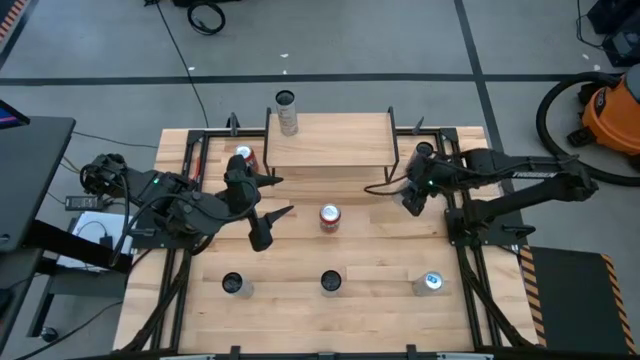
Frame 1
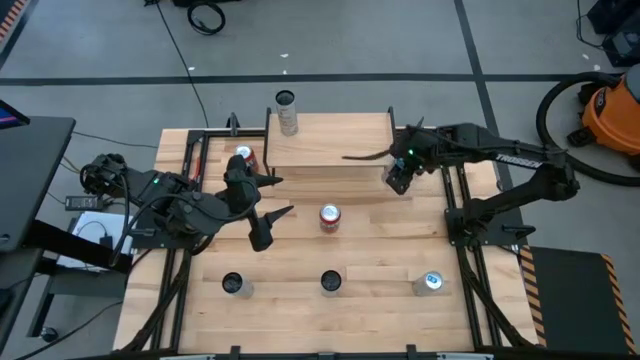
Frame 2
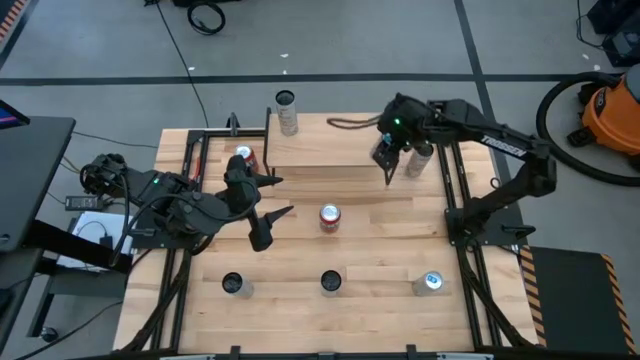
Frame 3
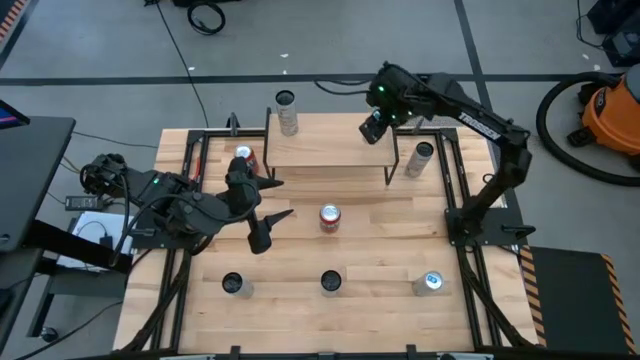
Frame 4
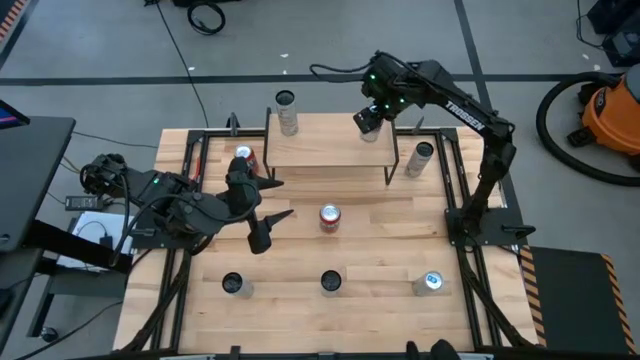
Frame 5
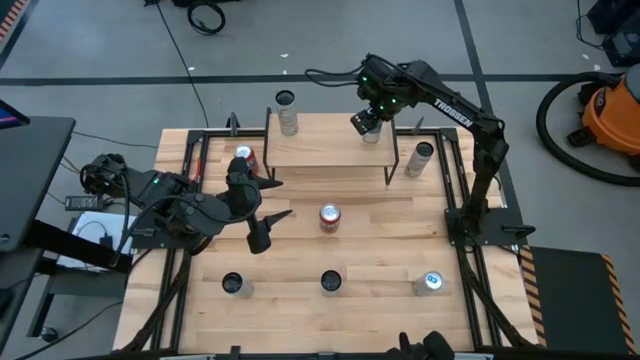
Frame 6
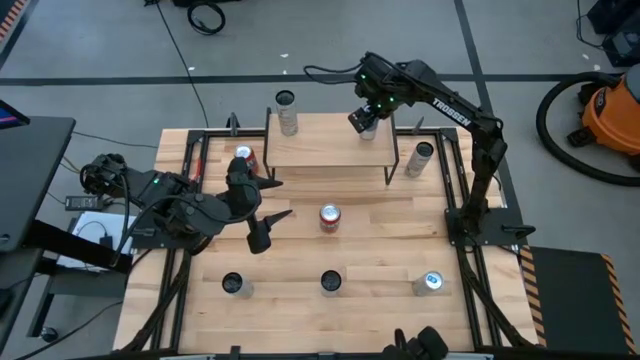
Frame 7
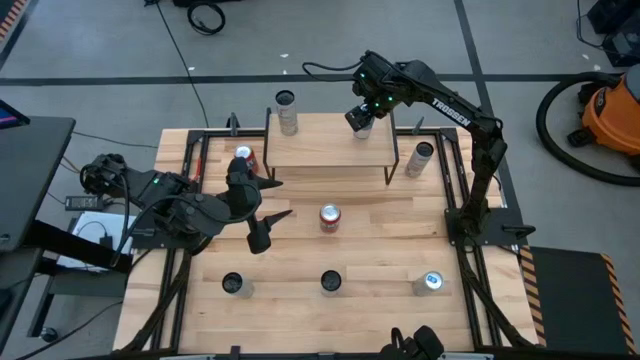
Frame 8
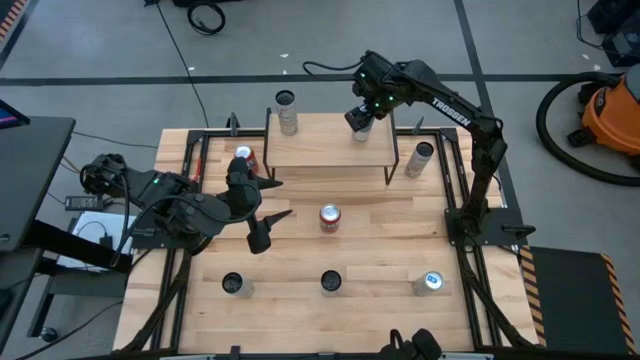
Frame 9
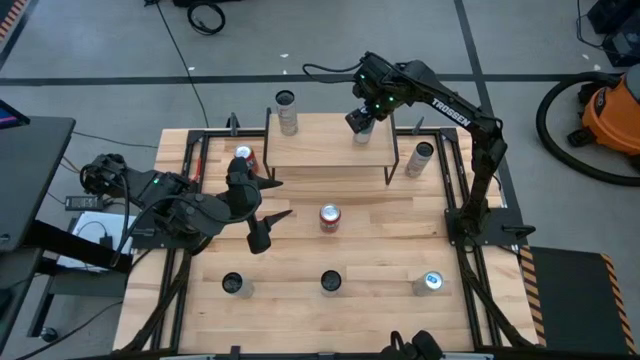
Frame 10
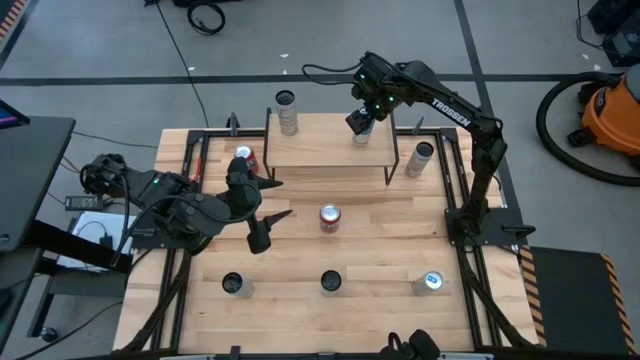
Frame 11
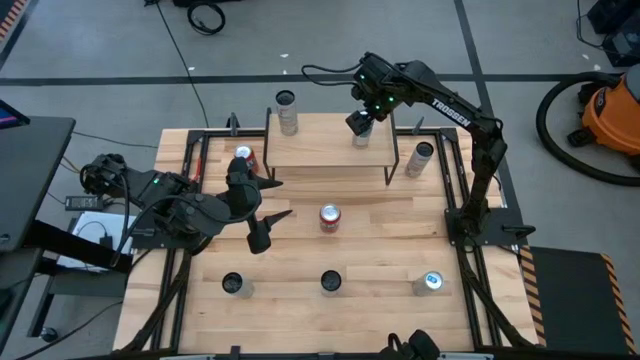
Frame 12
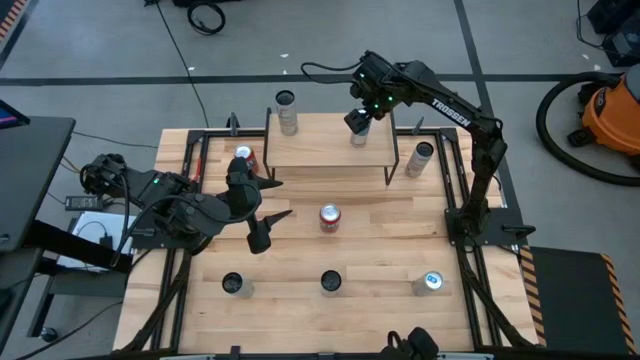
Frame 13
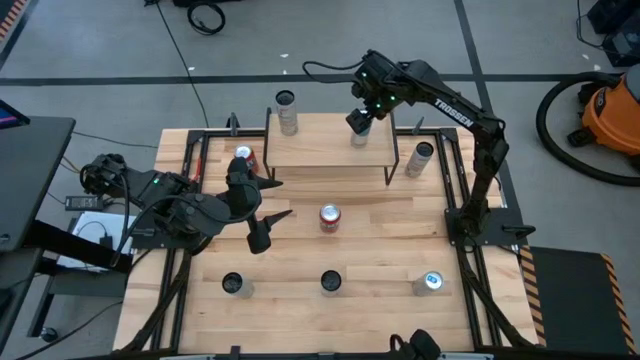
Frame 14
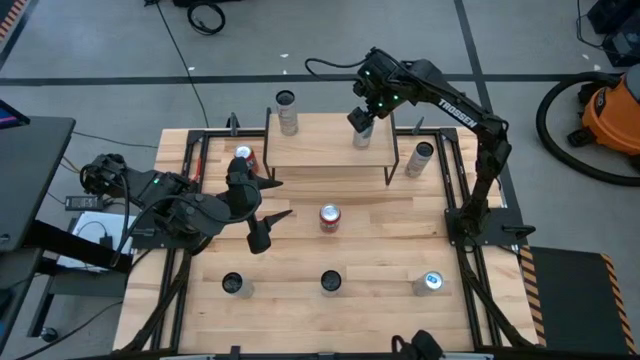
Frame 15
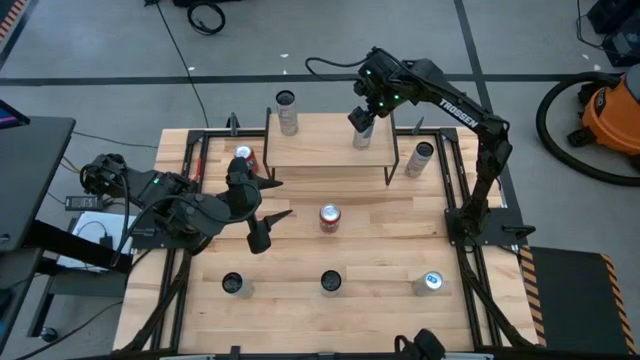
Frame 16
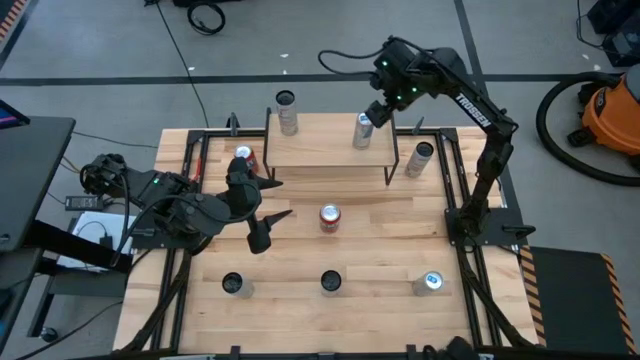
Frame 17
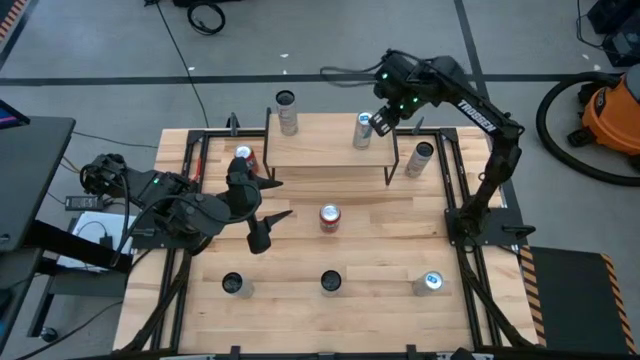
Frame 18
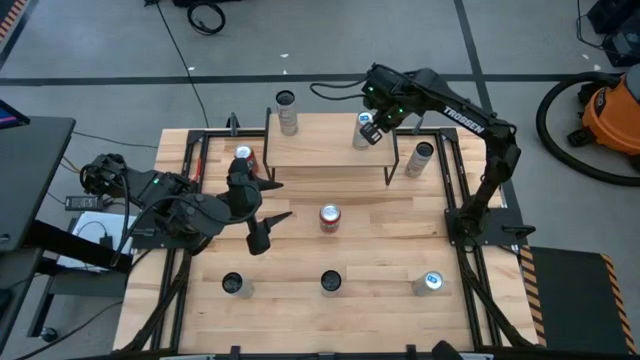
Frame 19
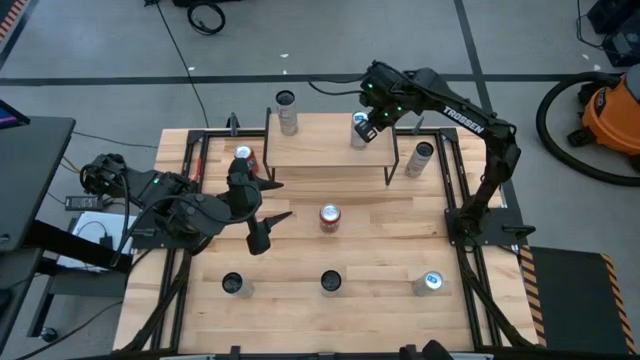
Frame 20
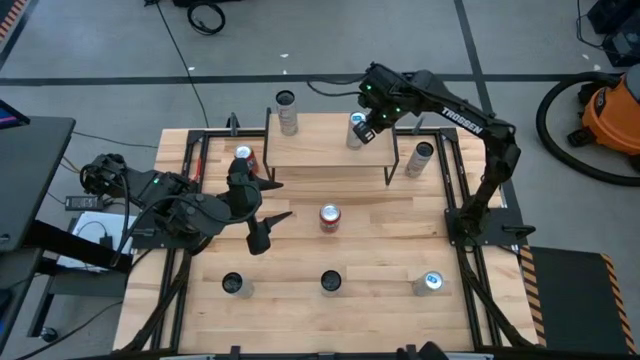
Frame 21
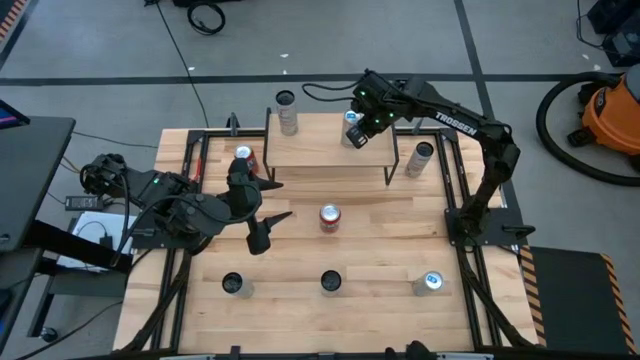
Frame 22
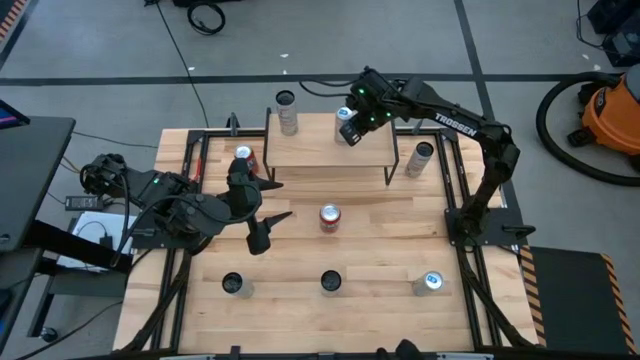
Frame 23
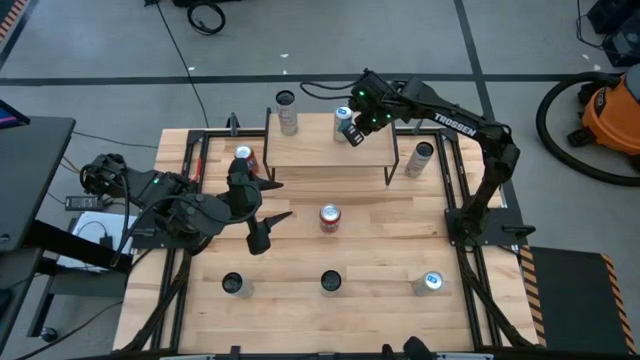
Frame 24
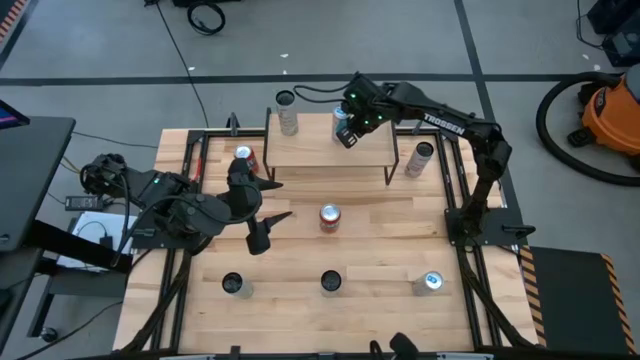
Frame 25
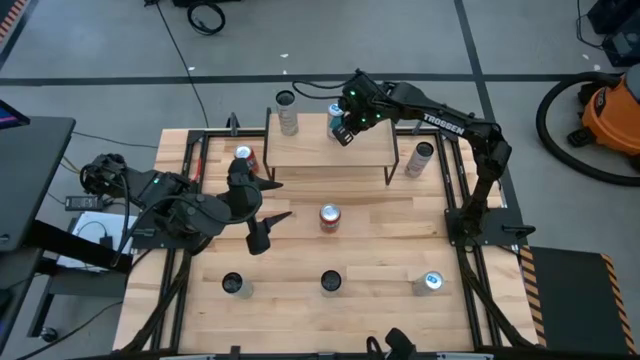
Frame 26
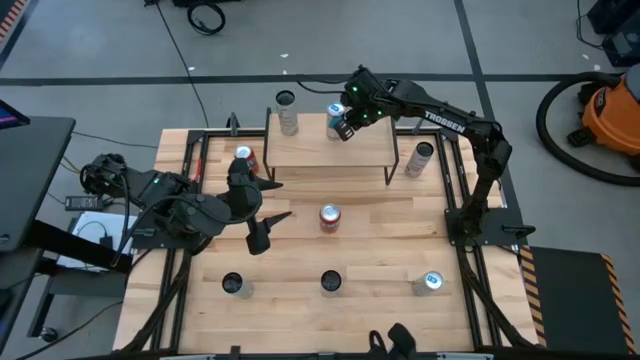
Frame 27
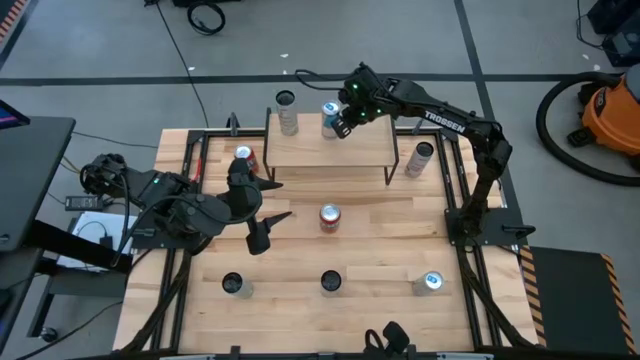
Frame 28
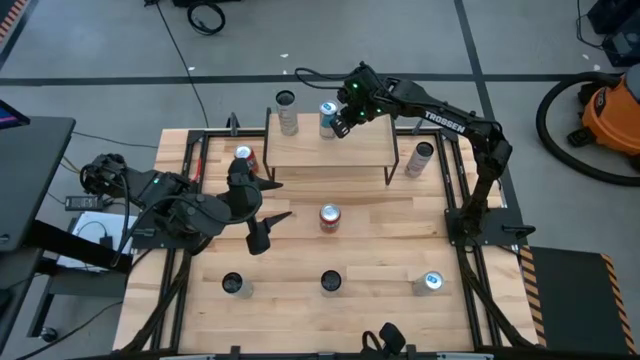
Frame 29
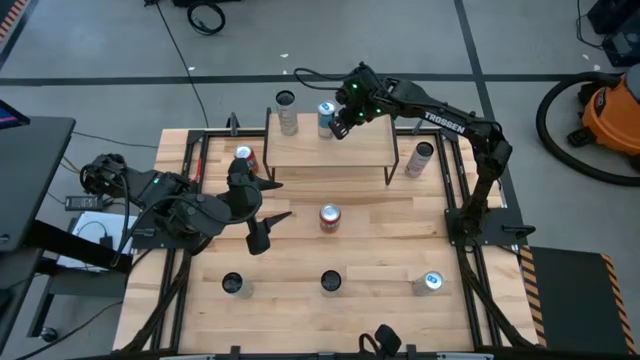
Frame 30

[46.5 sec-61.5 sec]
Task: Place canned beverage on shelf
Put the top blue soda can on the shelf

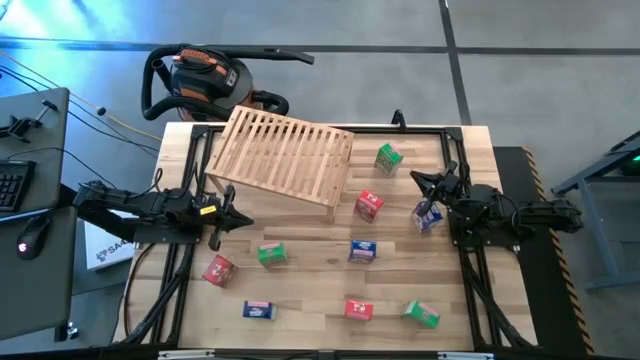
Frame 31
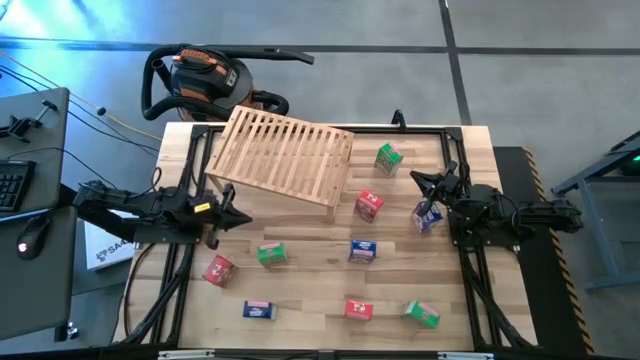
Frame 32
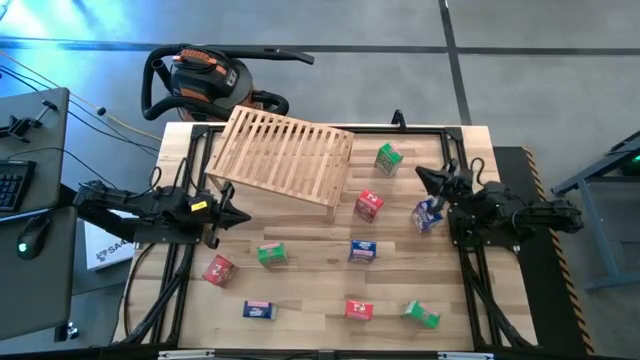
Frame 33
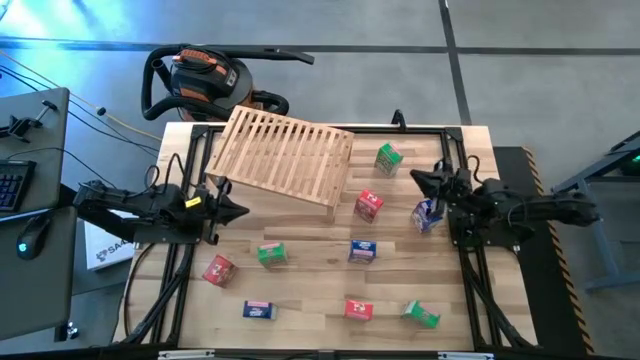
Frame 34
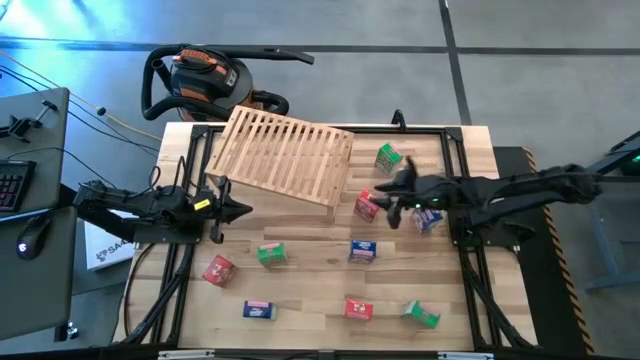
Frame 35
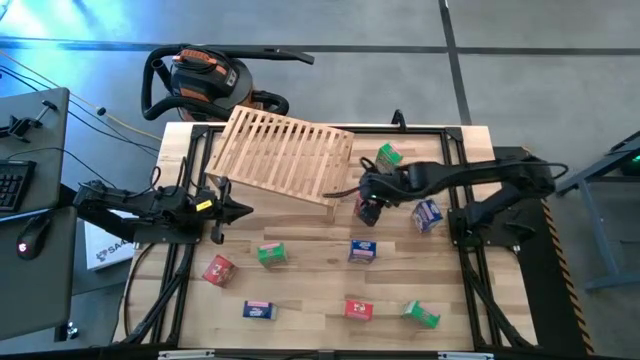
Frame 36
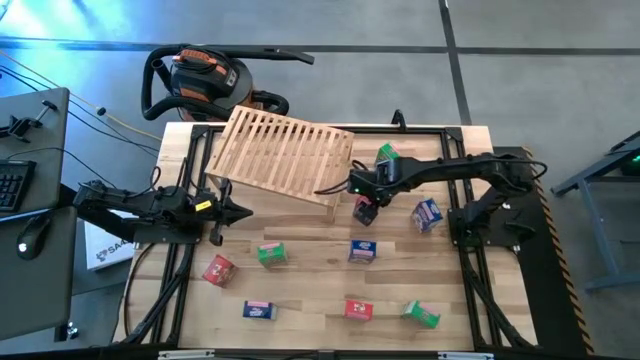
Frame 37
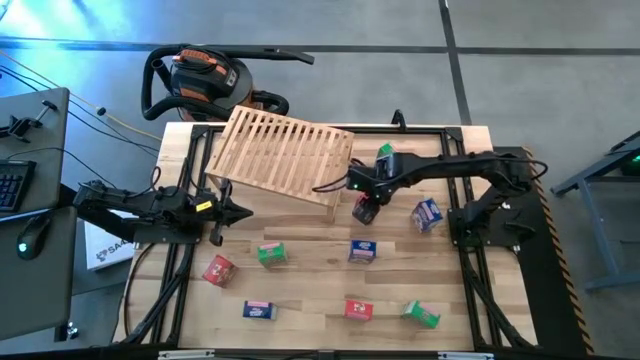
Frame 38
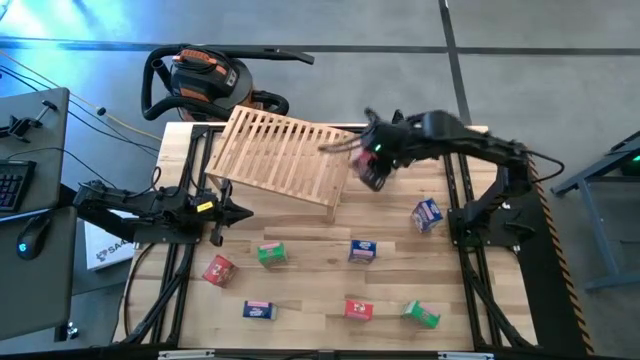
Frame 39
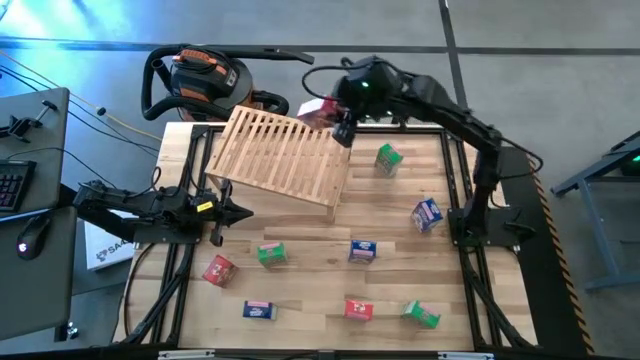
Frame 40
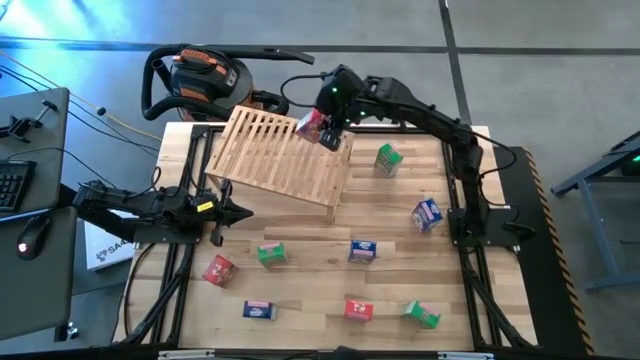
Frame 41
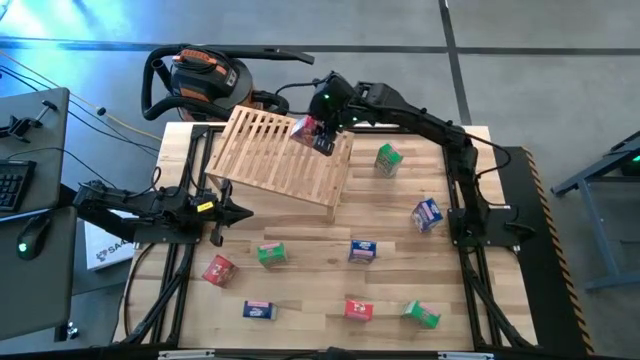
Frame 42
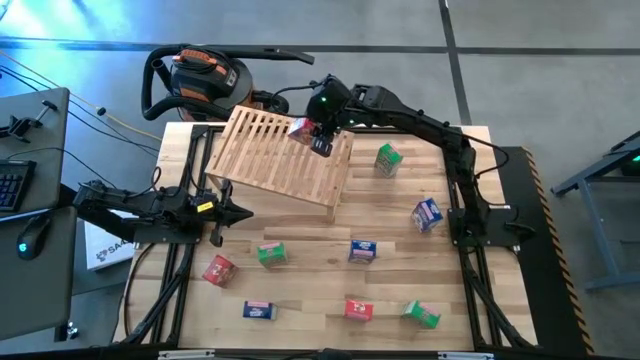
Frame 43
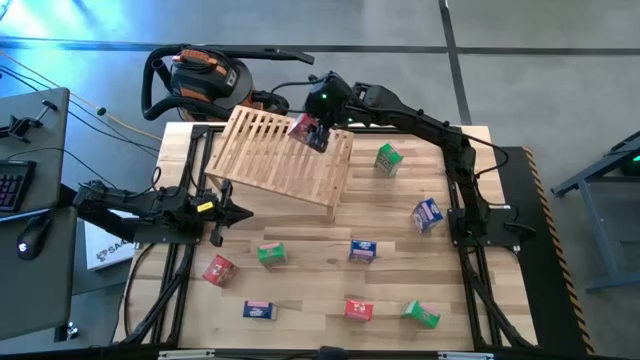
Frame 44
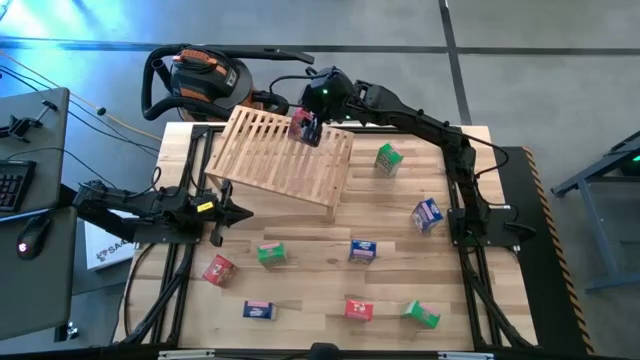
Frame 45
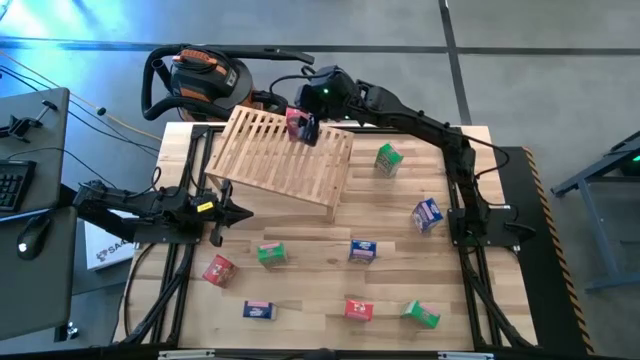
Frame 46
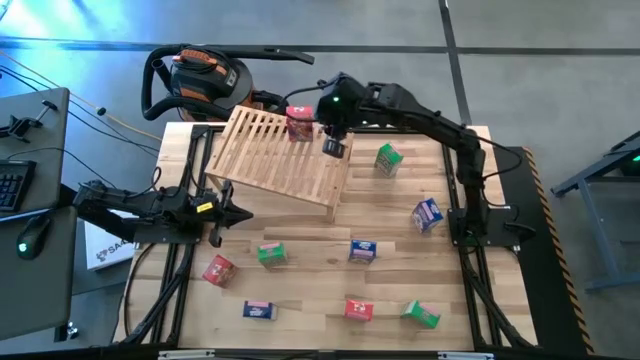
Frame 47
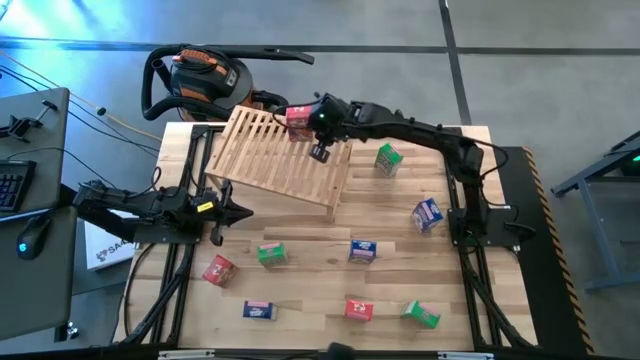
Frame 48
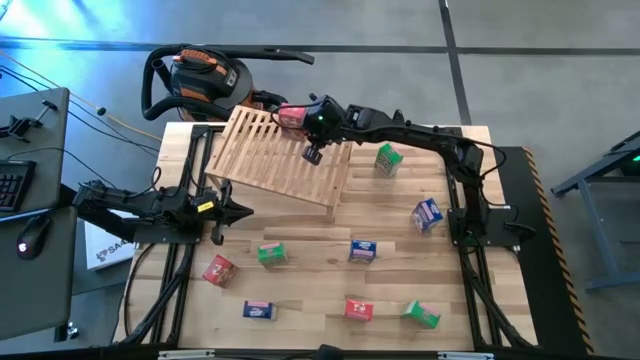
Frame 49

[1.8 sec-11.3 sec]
Task: Stack cereal on shelf
Put the top right red cereal box on the shelf
